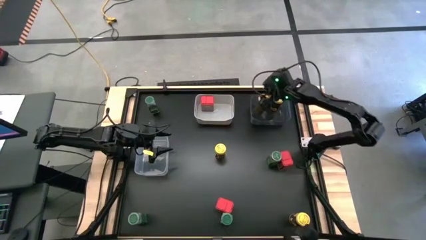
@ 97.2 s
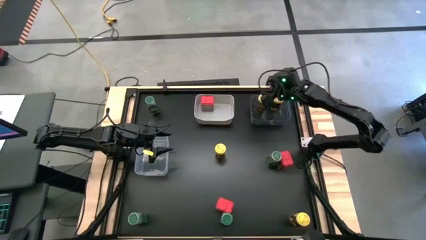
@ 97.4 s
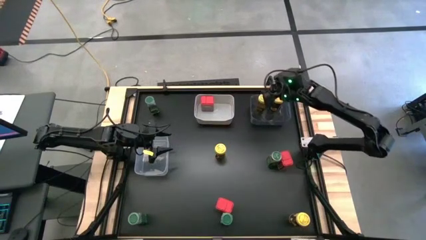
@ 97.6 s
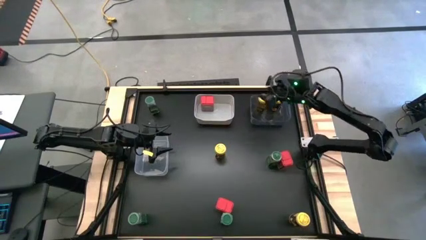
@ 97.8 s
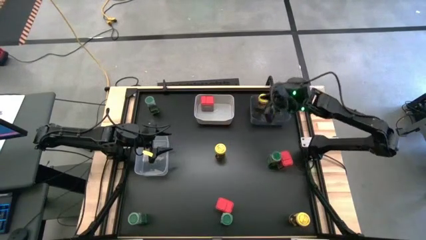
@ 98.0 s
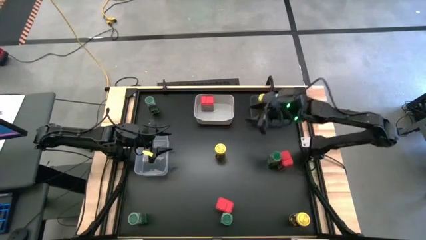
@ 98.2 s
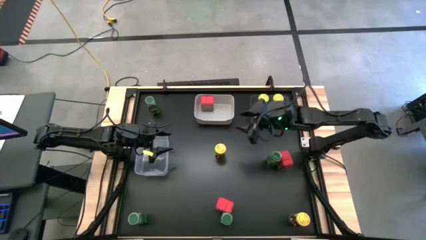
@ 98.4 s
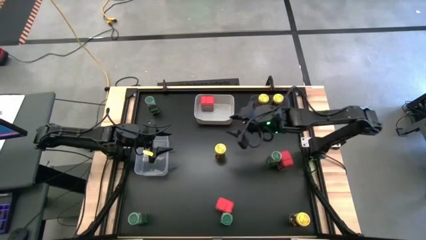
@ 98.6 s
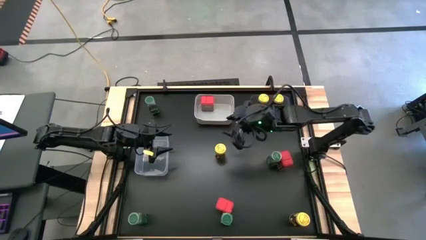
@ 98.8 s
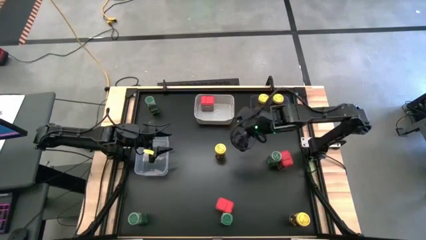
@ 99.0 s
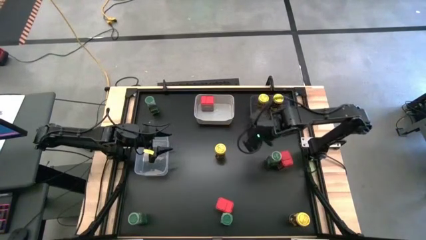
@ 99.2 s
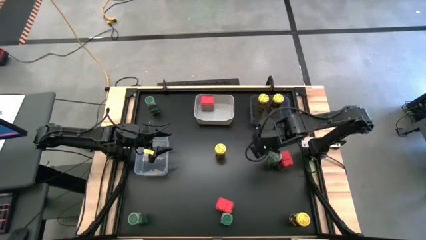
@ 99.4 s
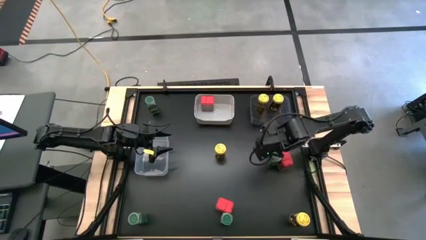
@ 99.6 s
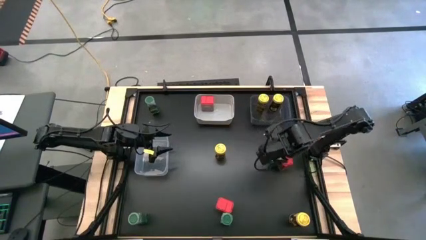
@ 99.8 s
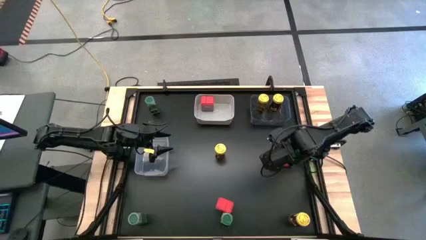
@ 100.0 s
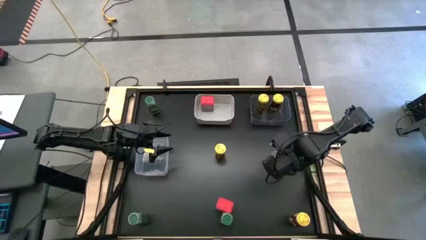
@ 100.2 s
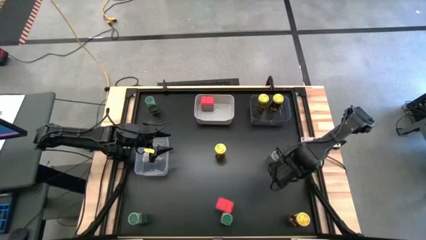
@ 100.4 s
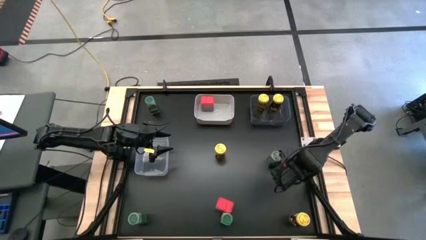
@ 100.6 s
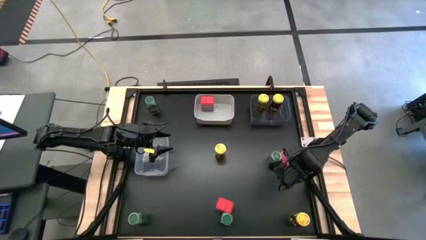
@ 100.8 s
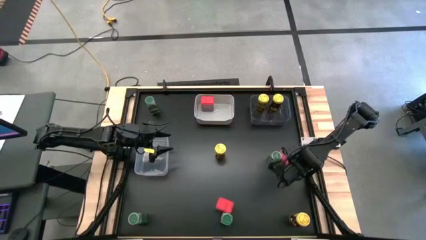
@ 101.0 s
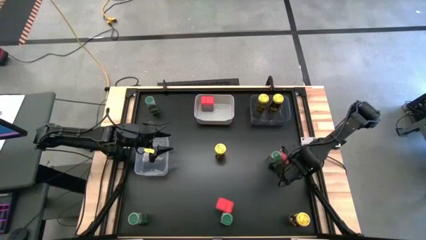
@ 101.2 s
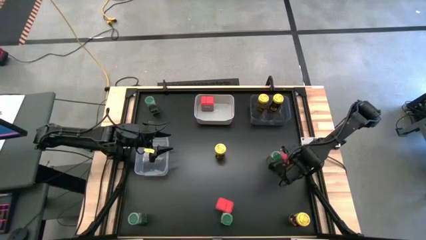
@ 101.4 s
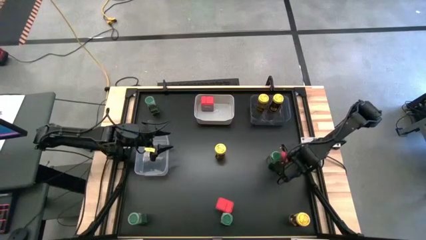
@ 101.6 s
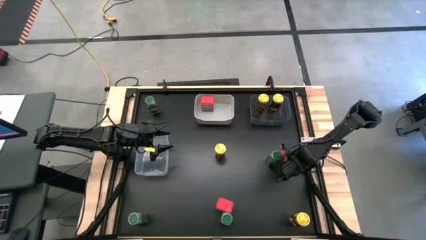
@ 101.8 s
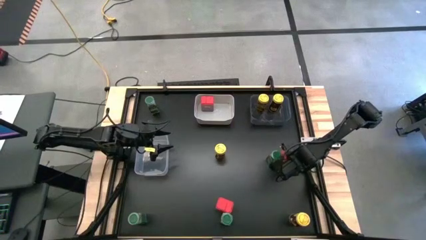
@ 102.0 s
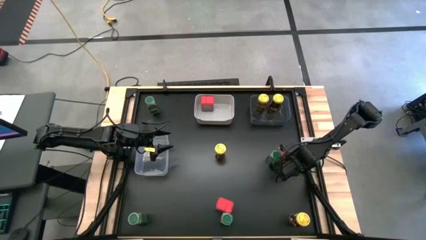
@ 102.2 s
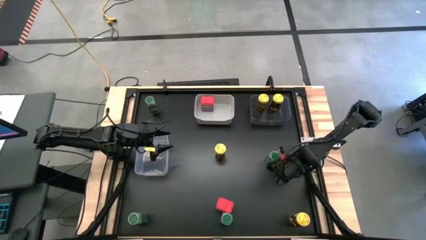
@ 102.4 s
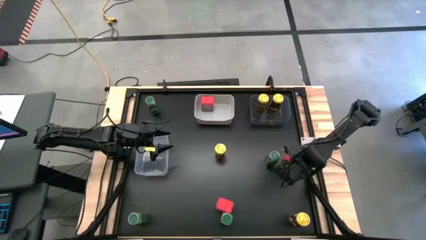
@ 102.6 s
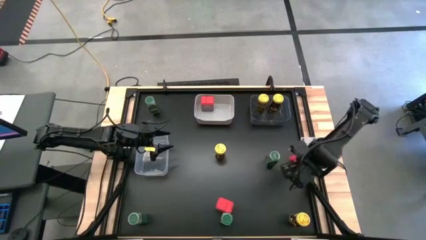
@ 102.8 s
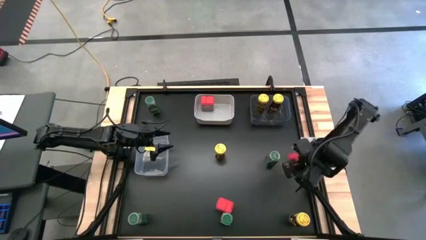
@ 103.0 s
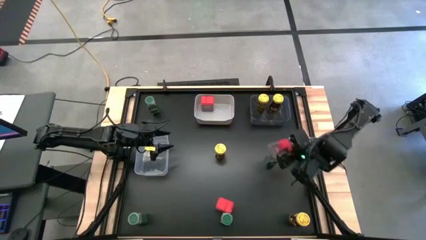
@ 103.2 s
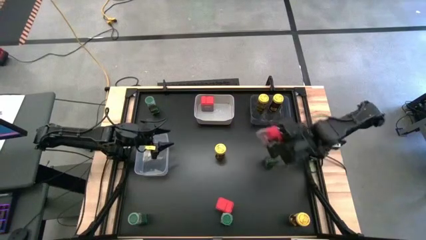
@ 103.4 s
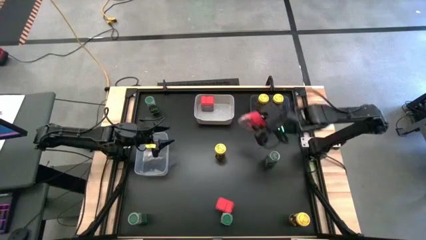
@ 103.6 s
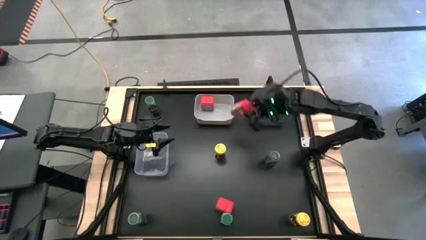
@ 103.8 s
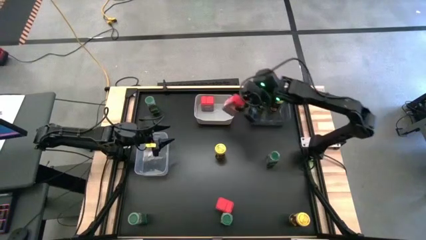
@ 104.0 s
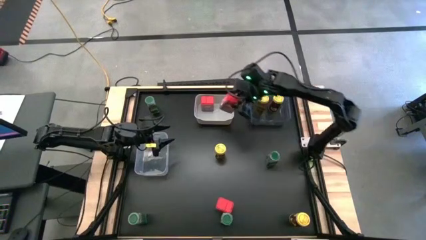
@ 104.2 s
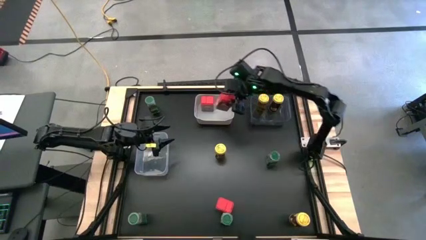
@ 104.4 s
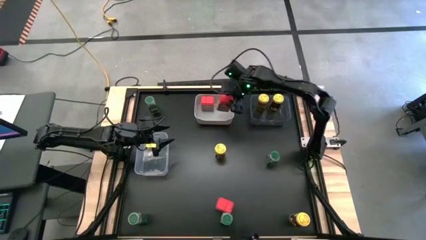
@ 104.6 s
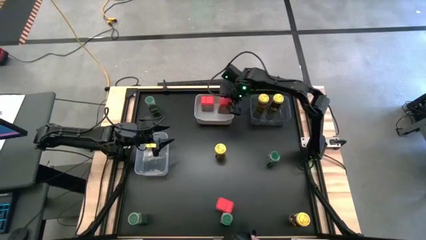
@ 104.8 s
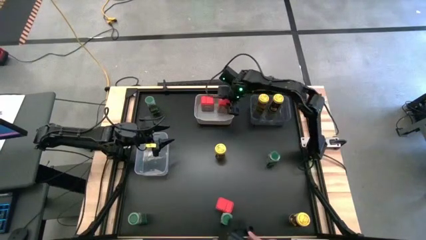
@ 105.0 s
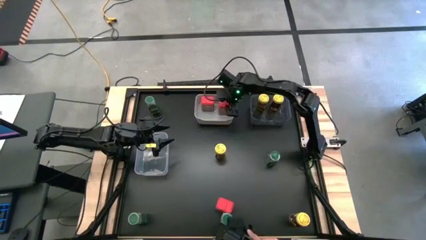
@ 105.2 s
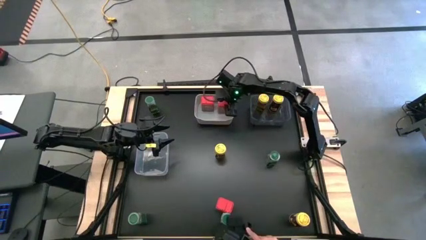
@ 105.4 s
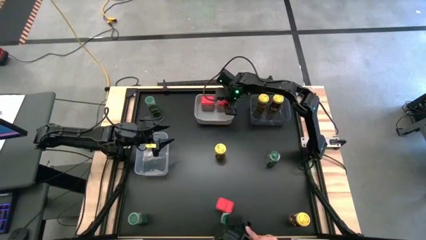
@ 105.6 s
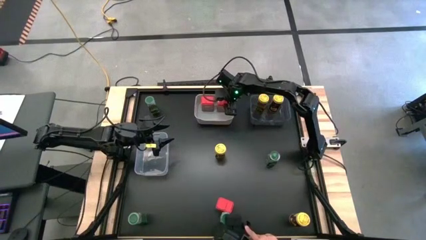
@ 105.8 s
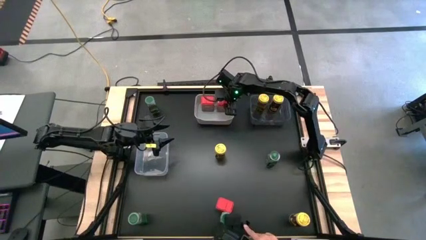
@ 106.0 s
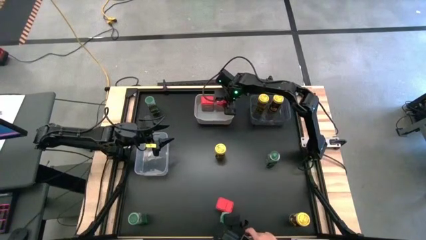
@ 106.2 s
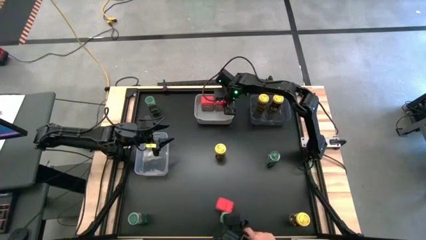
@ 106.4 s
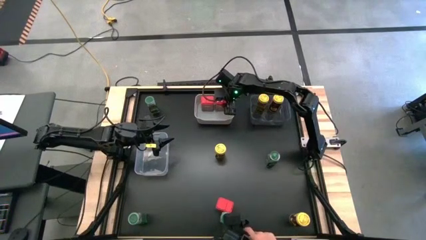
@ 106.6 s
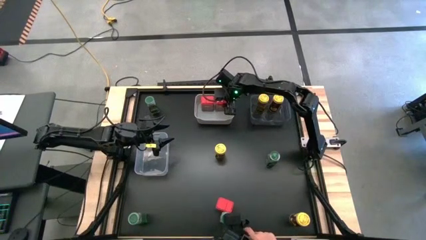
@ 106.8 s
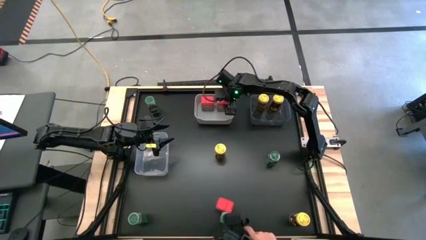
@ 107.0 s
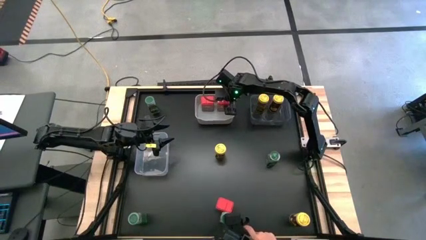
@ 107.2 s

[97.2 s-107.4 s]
Task: Sort spices by type
Put the right red seasoning can into the white bin

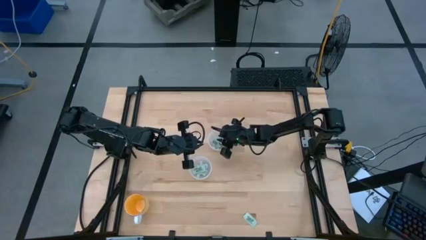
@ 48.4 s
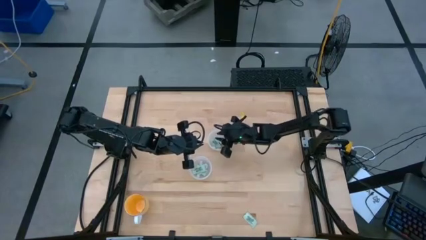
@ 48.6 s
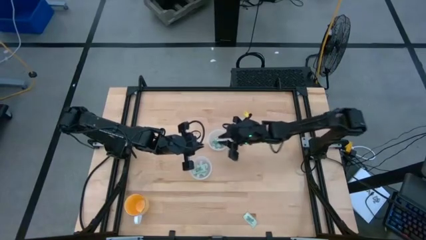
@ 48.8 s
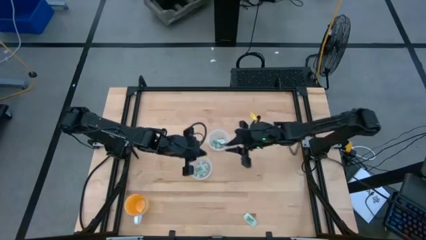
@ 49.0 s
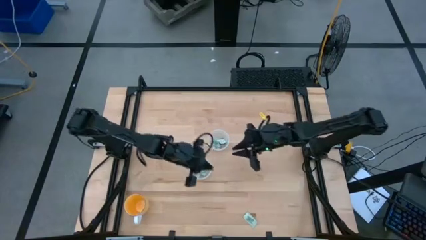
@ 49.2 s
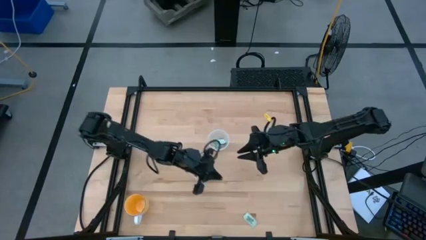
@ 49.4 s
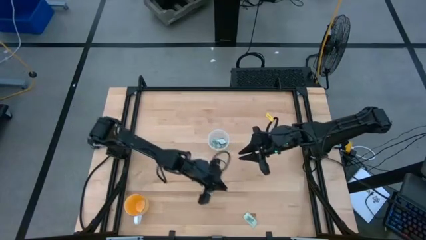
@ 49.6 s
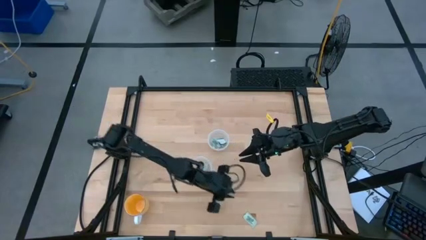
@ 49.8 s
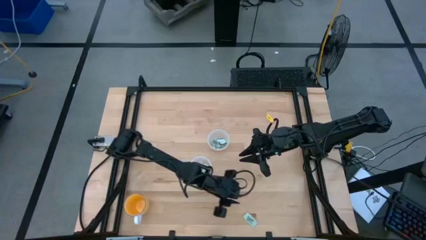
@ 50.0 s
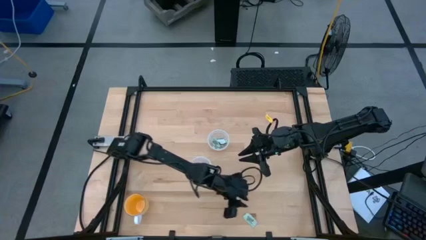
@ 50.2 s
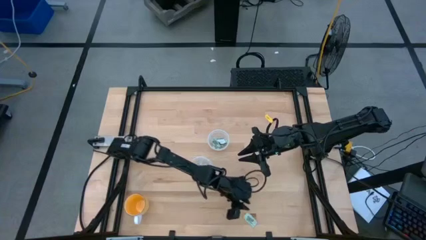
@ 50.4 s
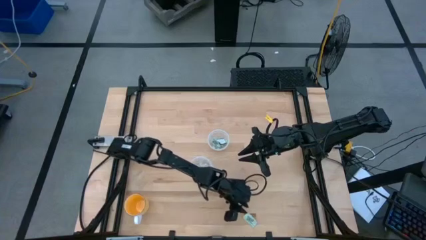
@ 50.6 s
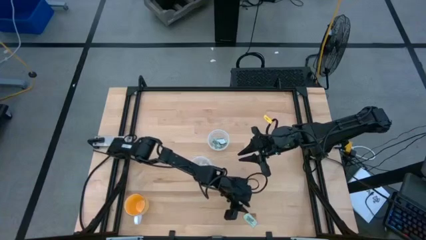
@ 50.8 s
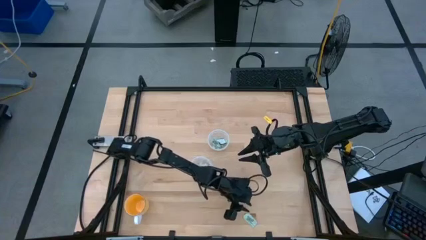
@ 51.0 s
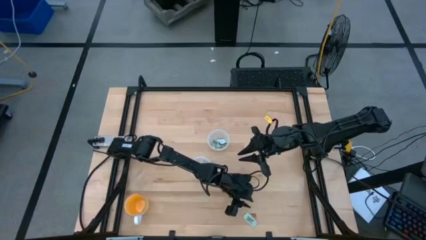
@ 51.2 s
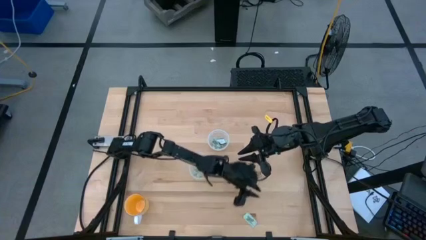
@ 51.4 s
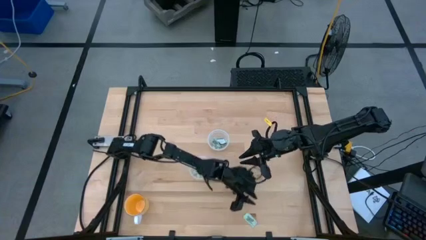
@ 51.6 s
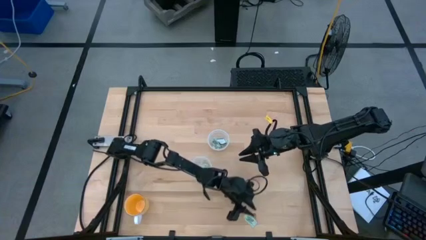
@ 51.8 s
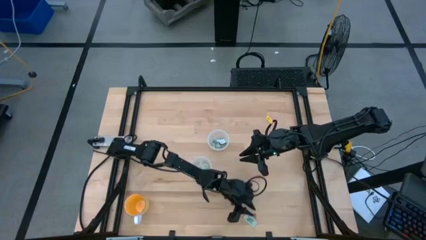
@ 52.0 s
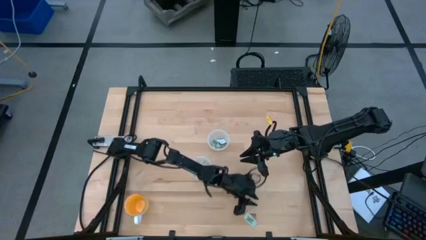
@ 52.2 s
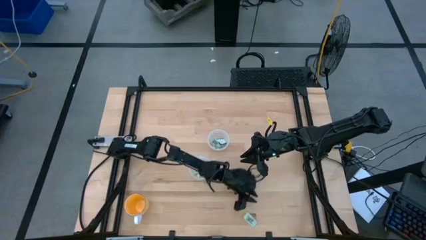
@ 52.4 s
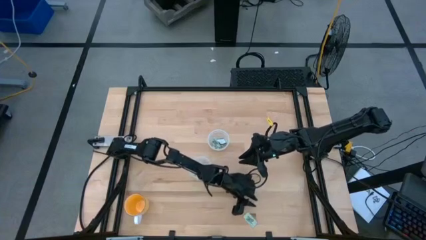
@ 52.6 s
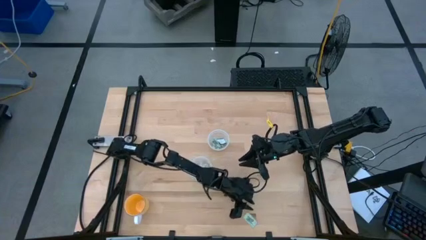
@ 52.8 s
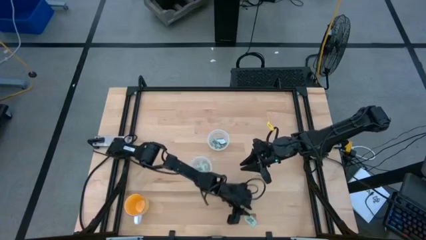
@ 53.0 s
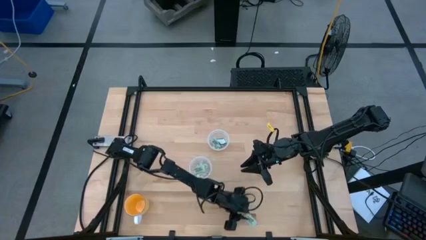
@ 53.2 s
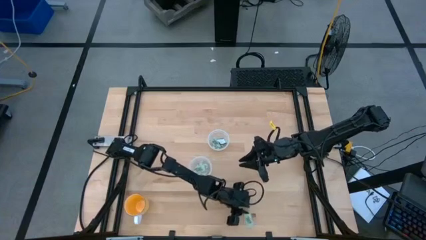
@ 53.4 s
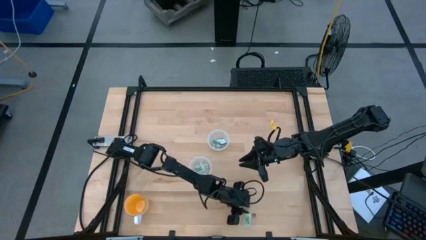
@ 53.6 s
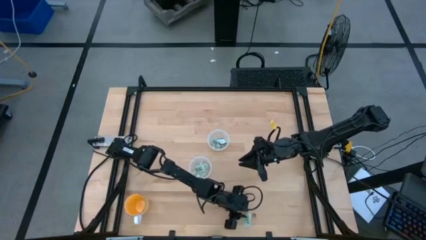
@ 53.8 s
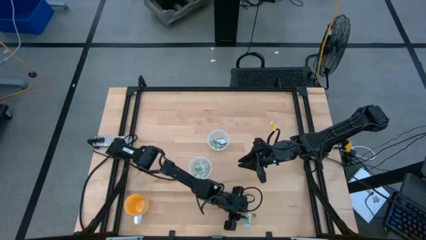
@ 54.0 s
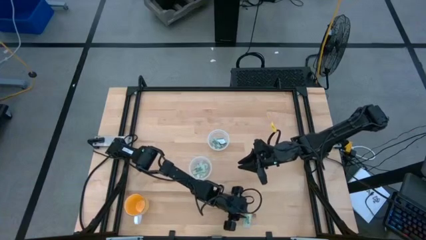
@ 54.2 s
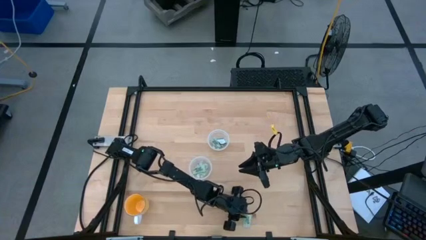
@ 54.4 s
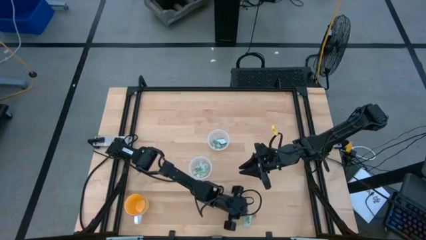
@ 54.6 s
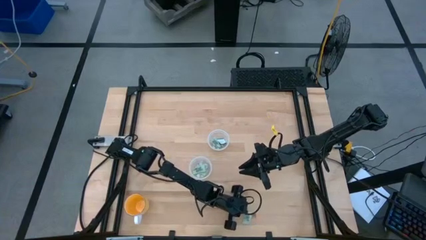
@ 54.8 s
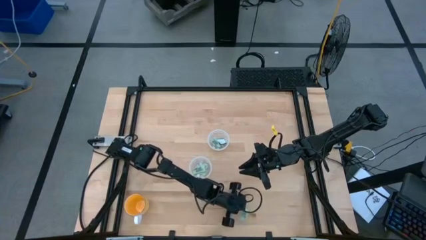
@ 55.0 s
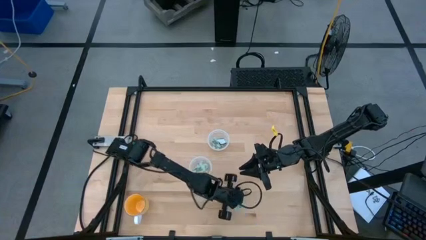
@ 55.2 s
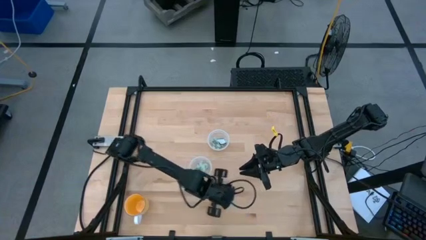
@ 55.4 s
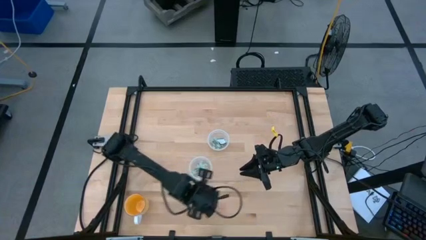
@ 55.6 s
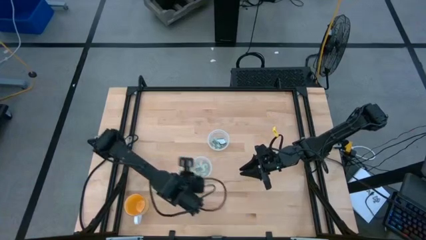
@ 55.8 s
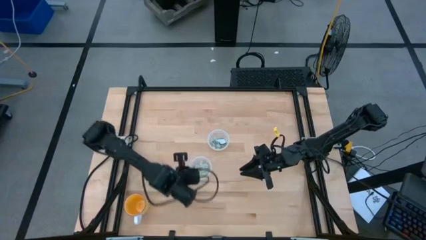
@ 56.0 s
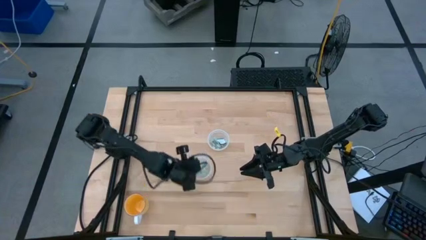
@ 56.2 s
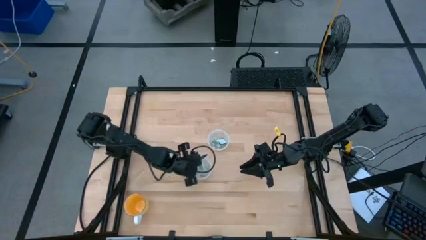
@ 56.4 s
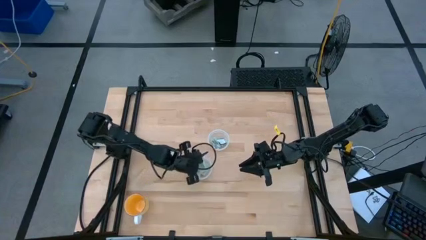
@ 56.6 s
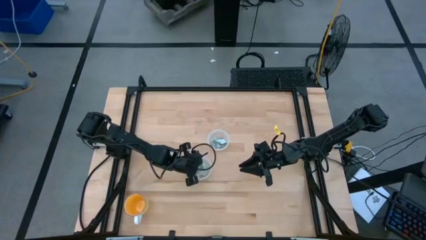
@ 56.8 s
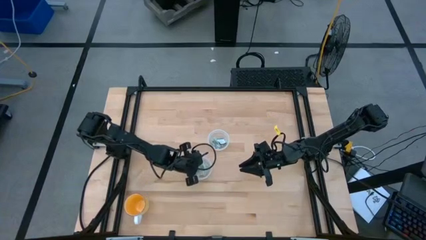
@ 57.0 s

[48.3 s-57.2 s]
Task: Pick and place Stevia / Truvia into bins
Put the stevia packet into the bottom transparent container
